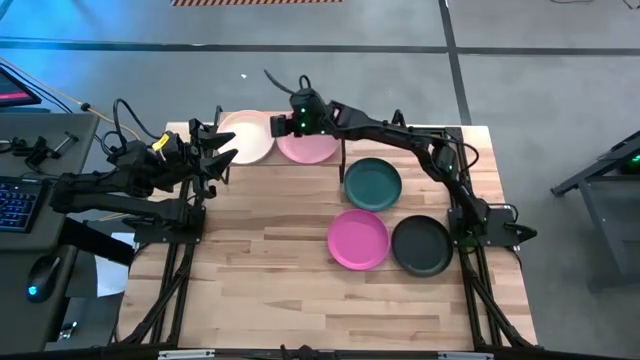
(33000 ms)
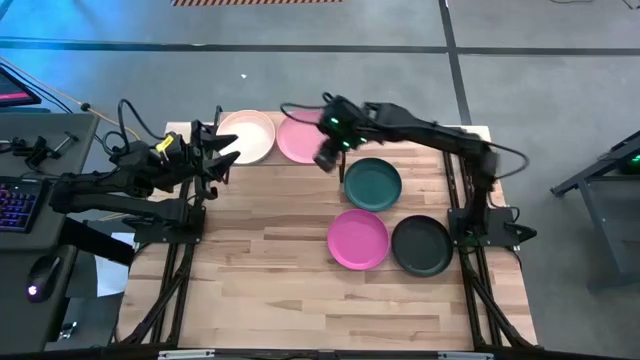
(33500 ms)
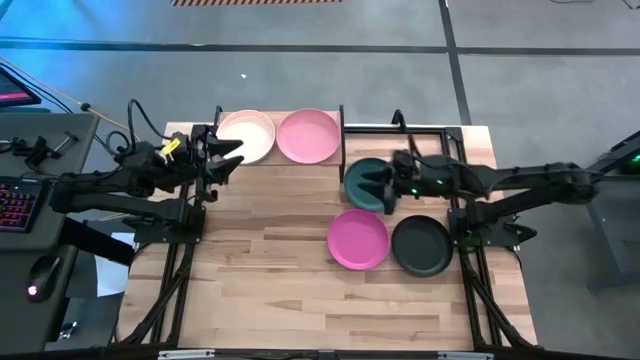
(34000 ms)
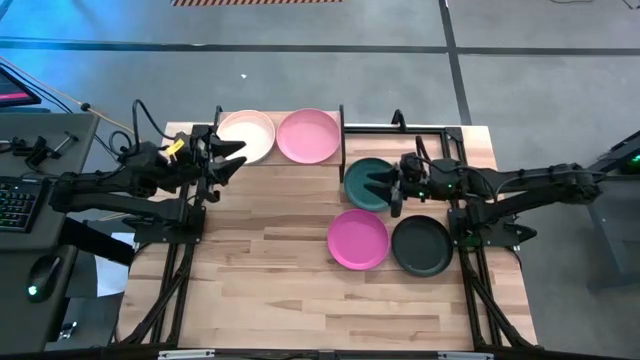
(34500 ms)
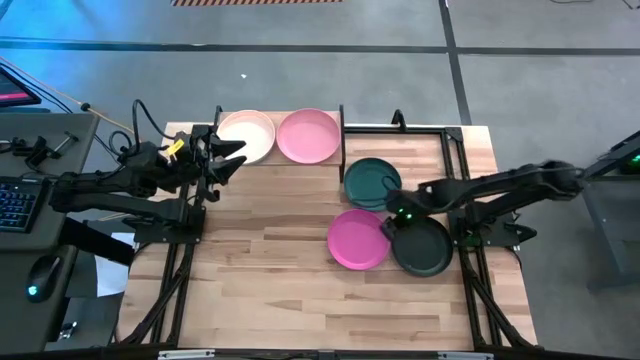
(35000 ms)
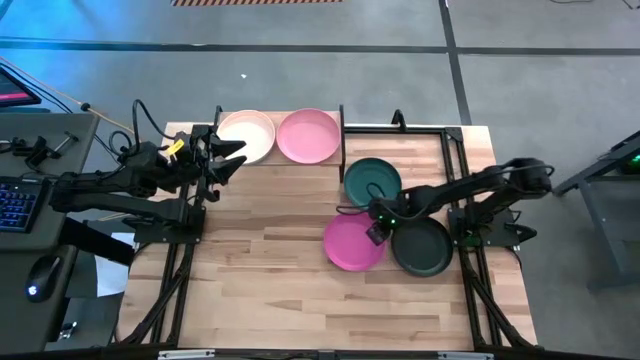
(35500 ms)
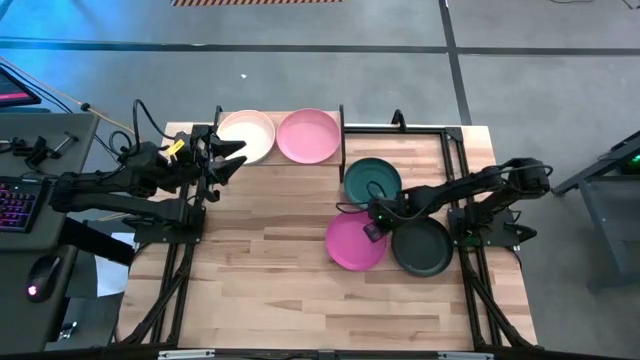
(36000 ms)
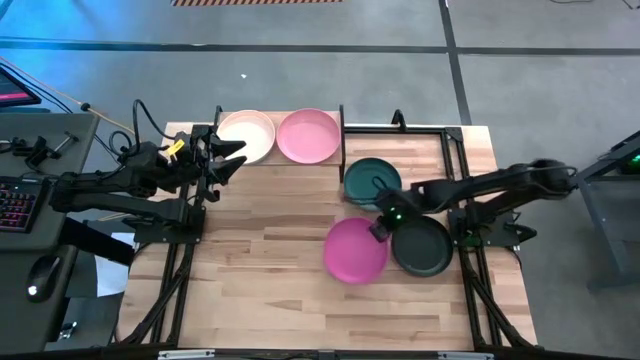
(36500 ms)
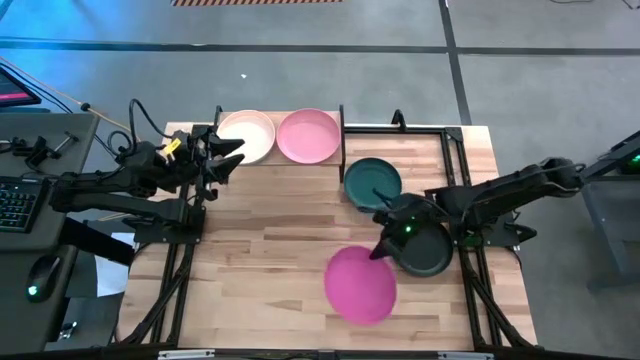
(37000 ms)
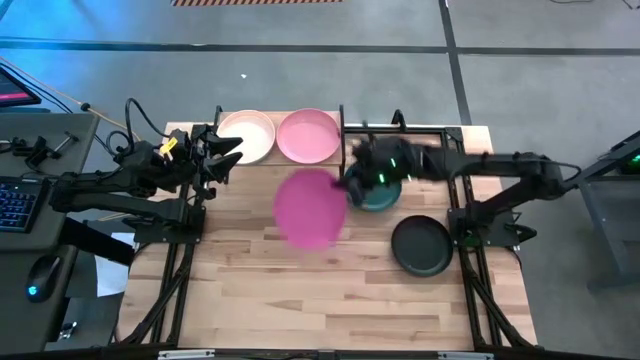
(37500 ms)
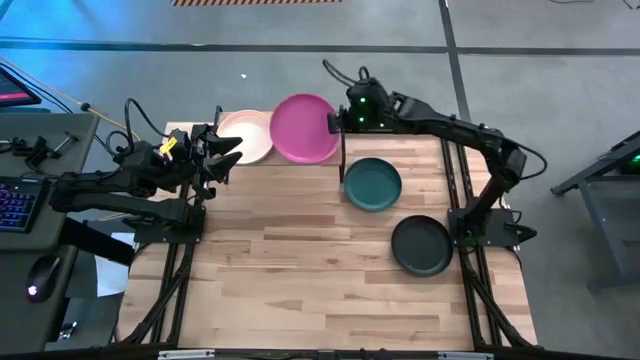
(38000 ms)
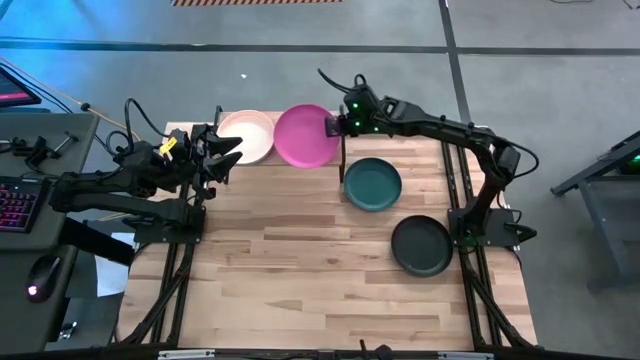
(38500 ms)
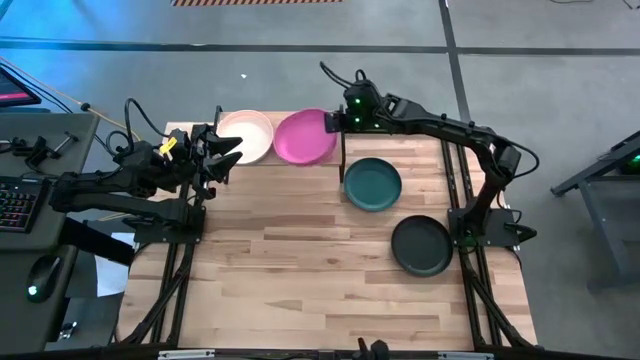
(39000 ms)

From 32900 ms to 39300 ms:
Task: Place and stack plates onto a shelf
Stack the pink plate on top of the light pink plate

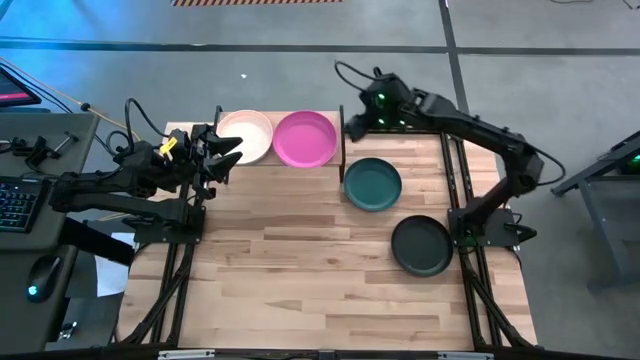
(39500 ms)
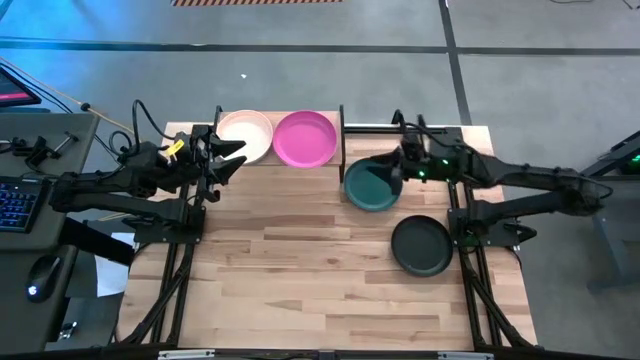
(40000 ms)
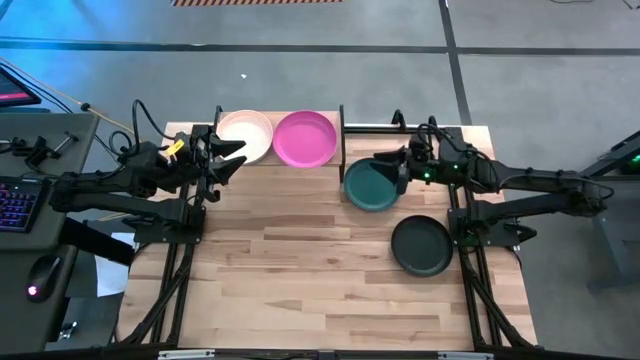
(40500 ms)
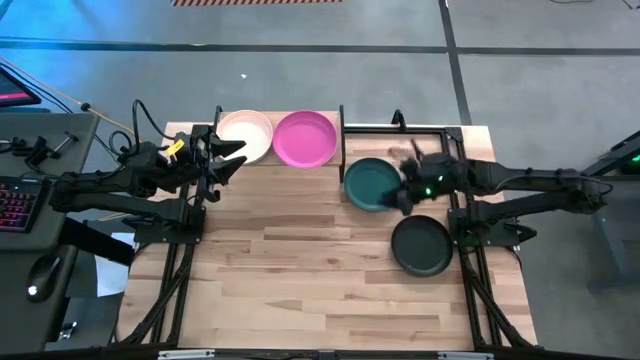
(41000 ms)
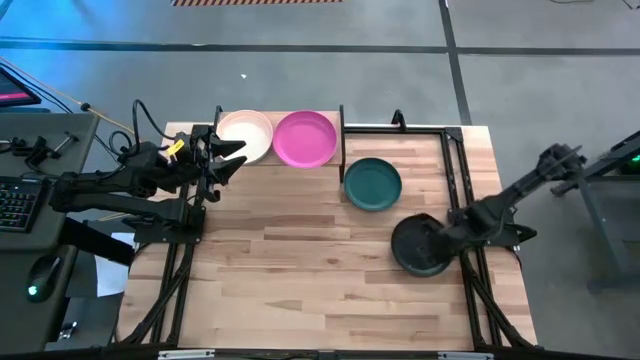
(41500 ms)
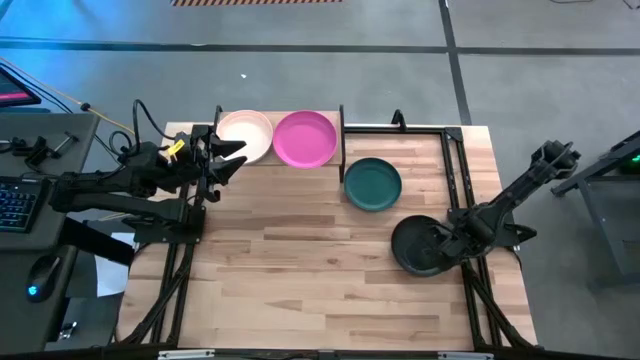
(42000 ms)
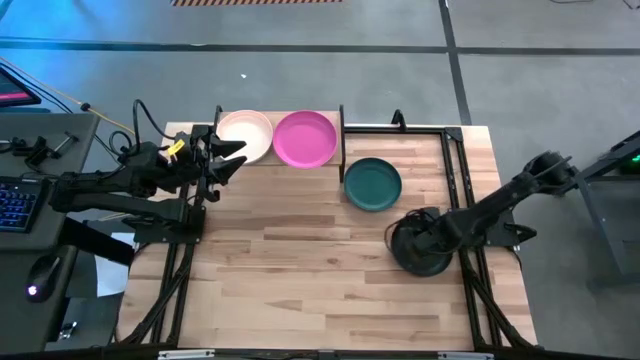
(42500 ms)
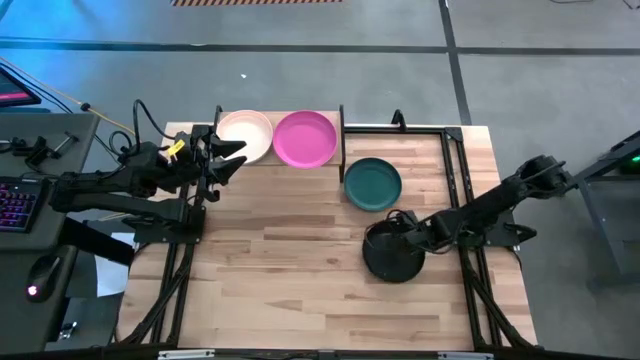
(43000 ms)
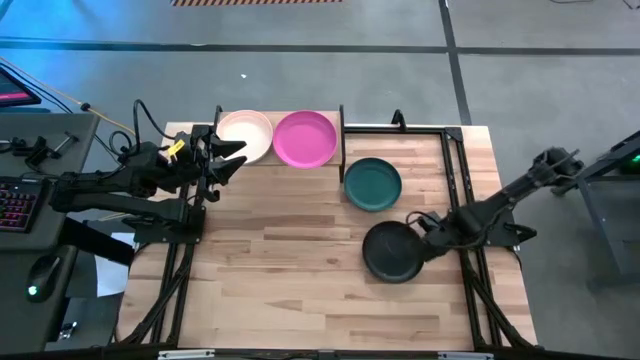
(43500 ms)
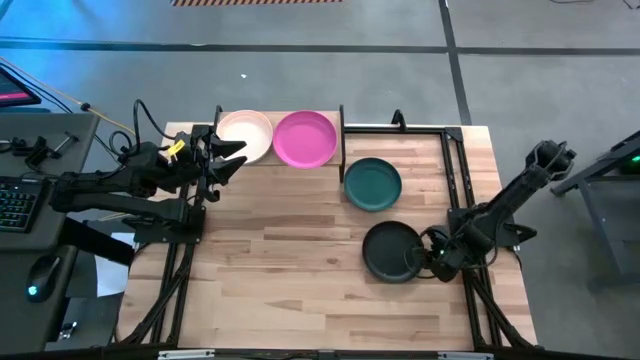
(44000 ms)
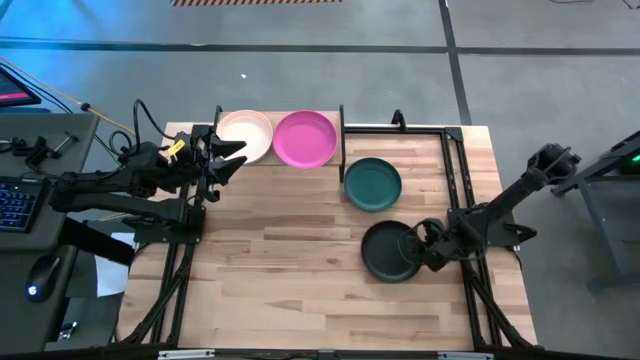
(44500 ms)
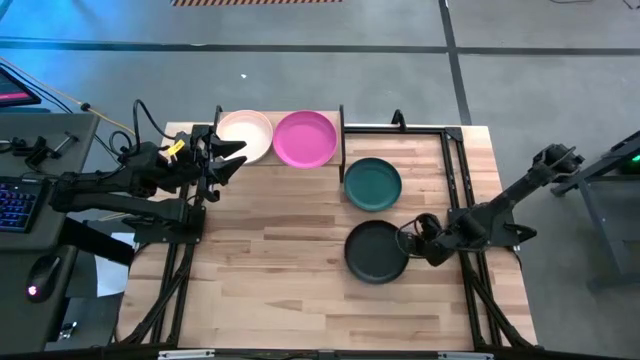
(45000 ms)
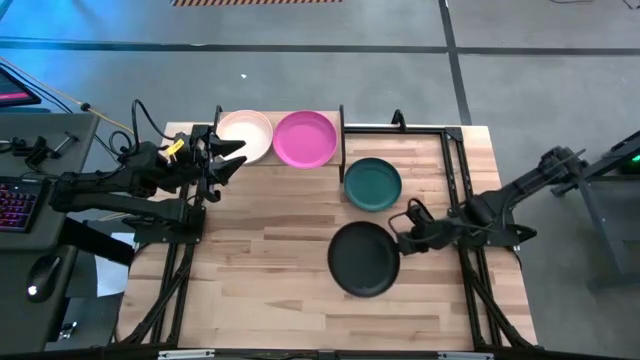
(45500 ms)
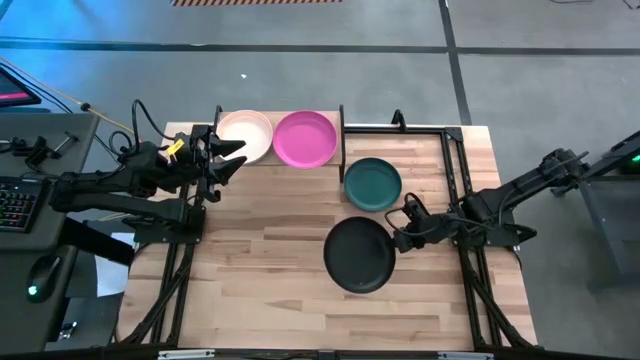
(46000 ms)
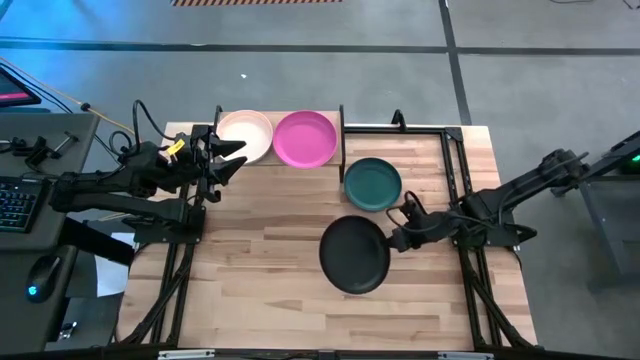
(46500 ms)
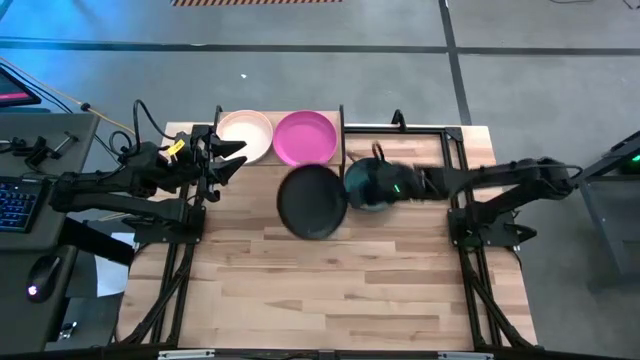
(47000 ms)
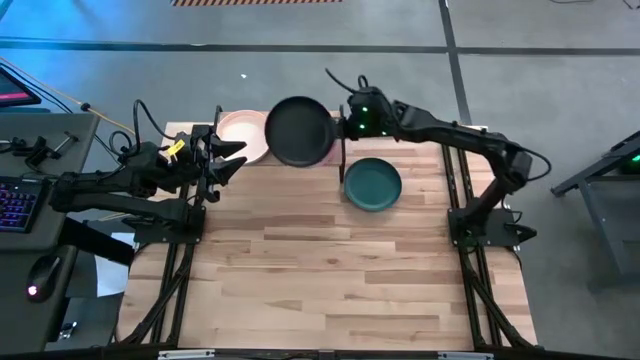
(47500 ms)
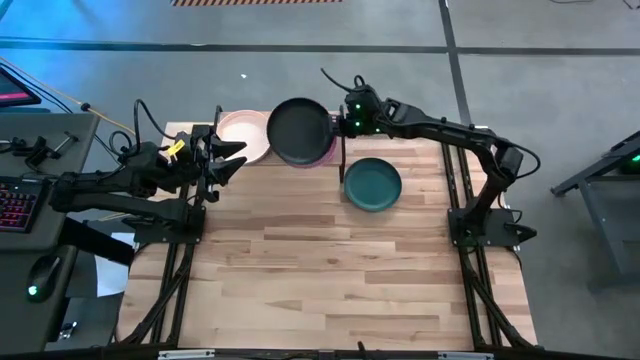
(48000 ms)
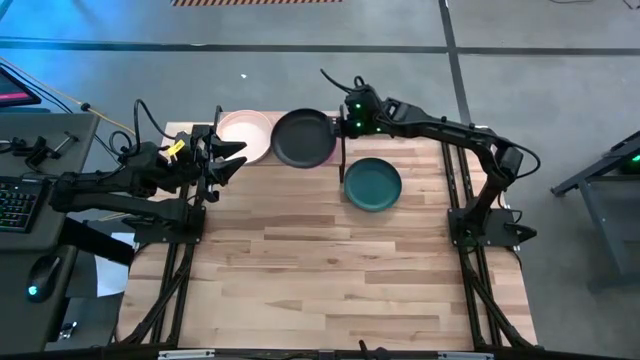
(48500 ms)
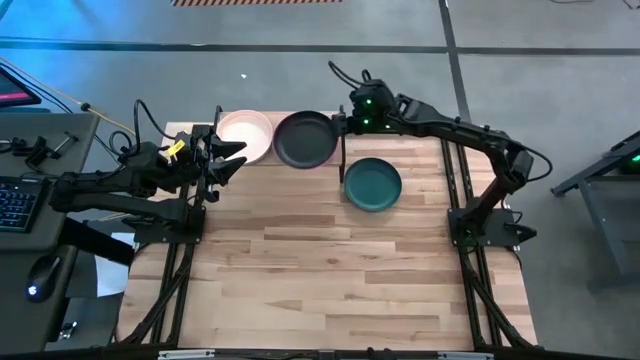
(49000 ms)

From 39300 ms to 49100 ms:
Stack the black plate on top of the pink plate

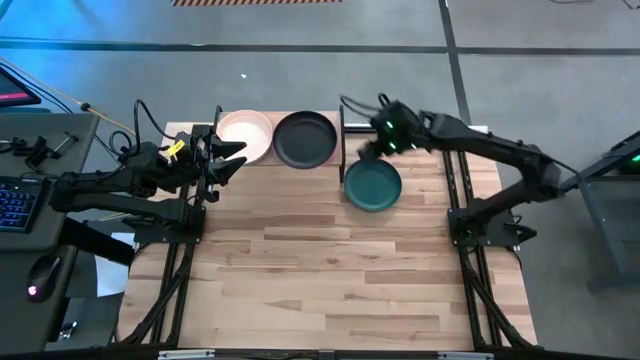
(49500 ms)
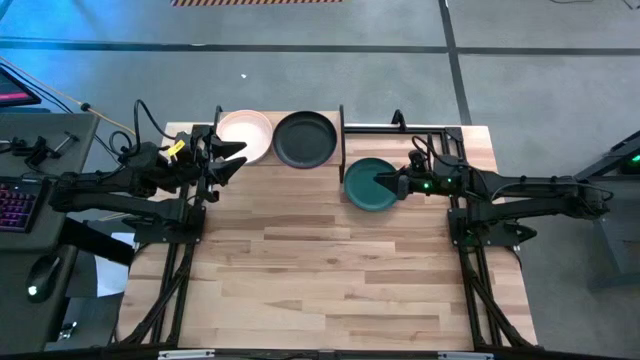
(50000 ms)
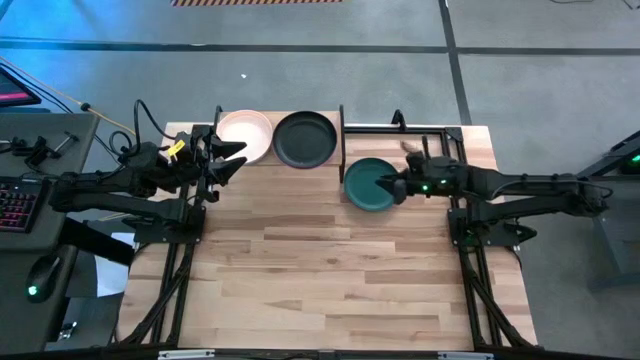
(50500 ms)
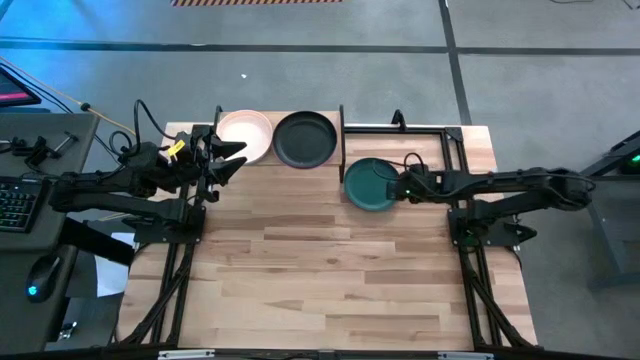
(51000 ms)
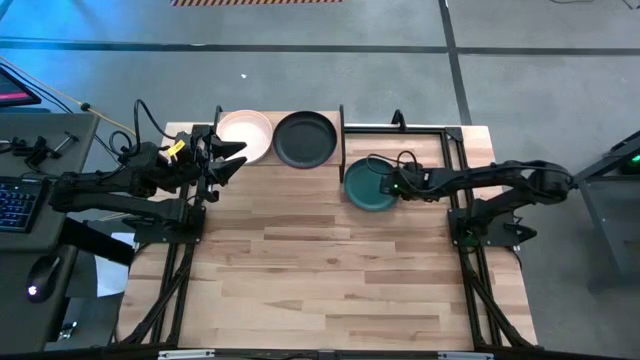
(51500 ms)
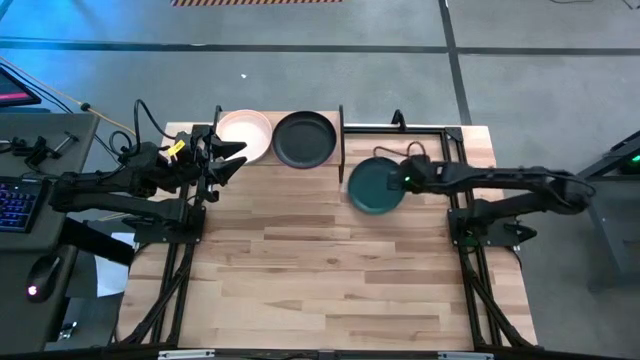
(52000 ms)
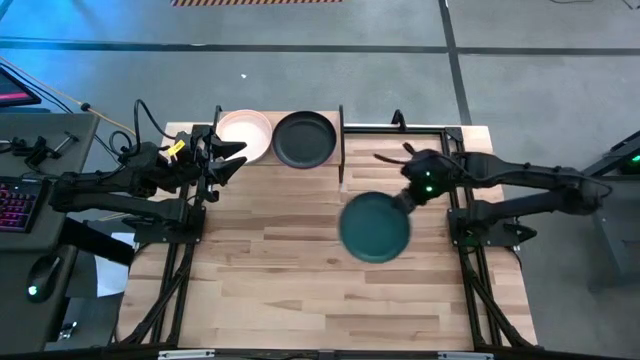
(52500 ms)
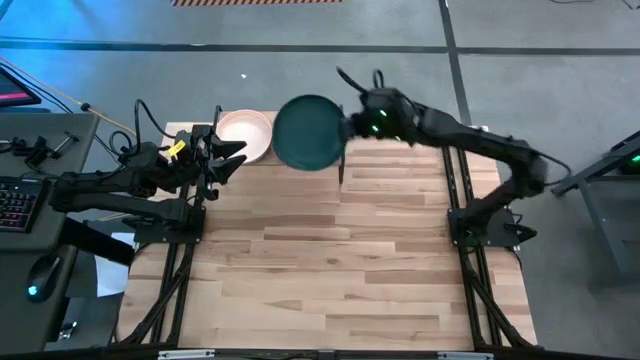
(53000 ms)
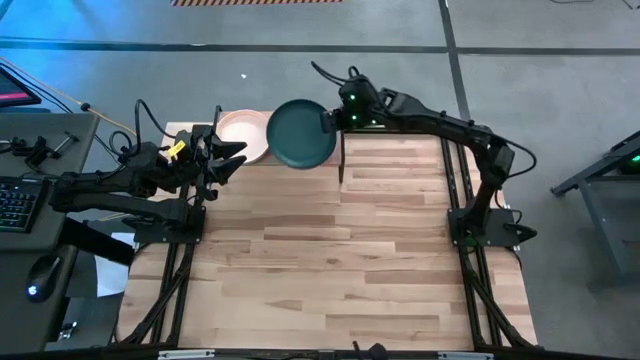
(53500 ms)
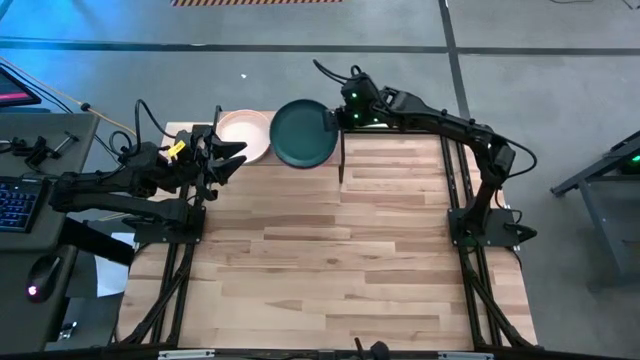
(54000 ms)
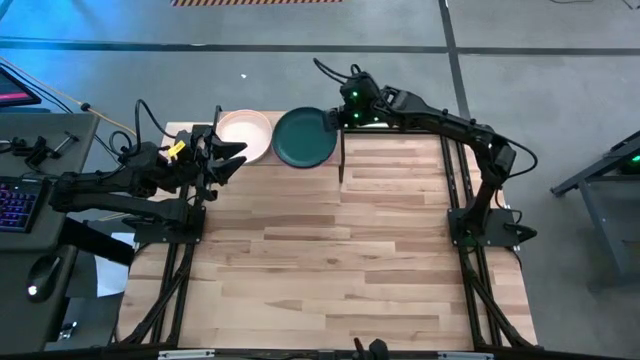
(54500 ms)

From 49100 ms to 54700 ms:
Stack the green plate on top of the black plate
